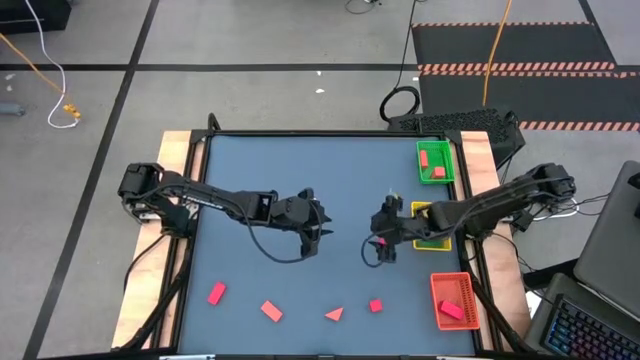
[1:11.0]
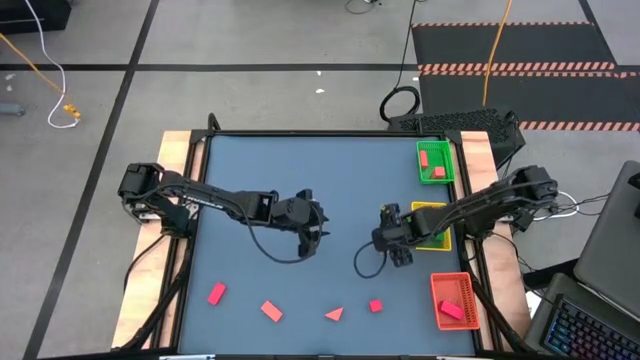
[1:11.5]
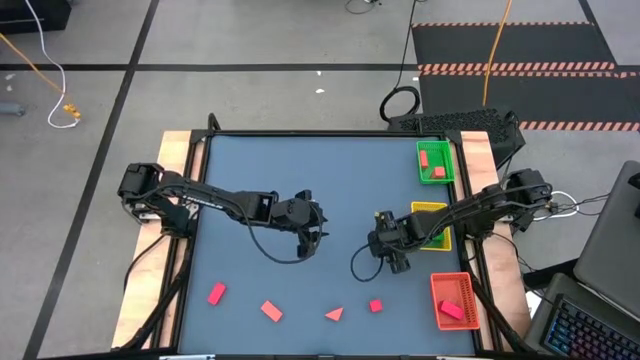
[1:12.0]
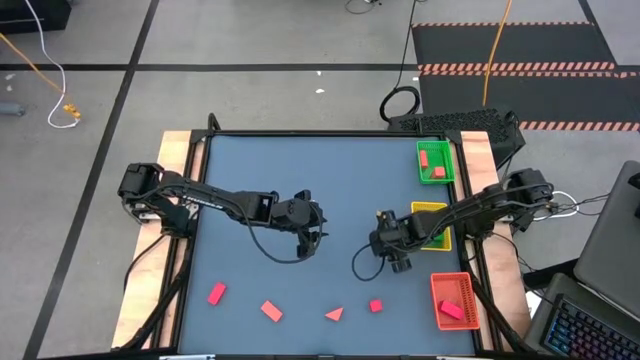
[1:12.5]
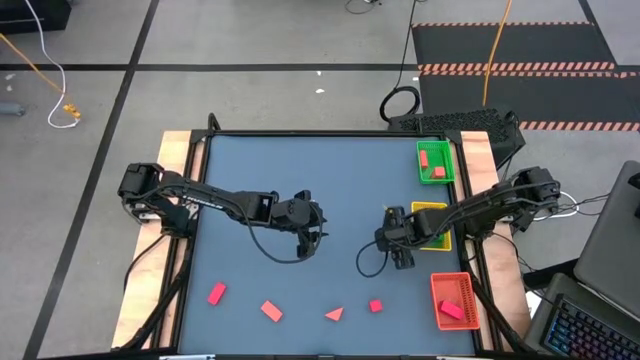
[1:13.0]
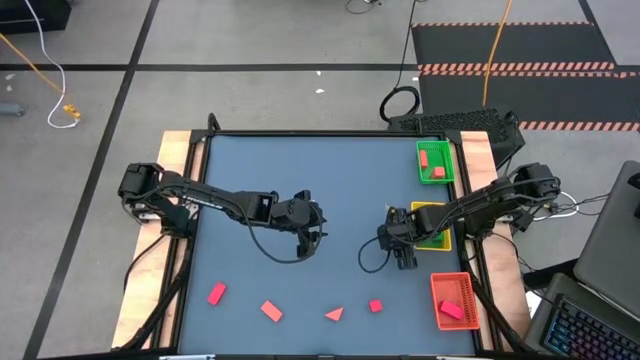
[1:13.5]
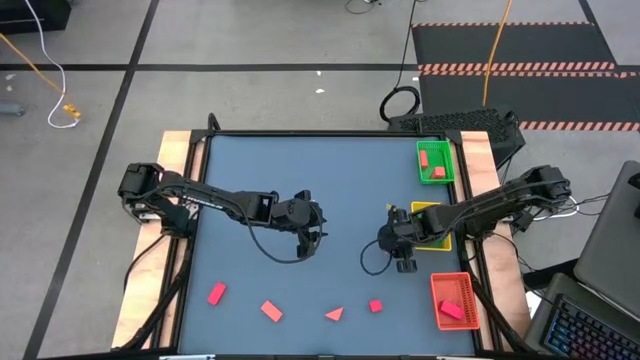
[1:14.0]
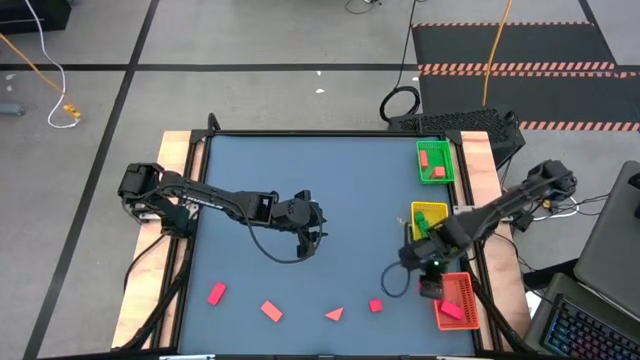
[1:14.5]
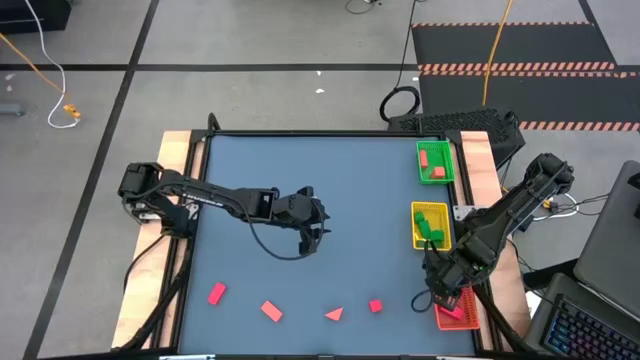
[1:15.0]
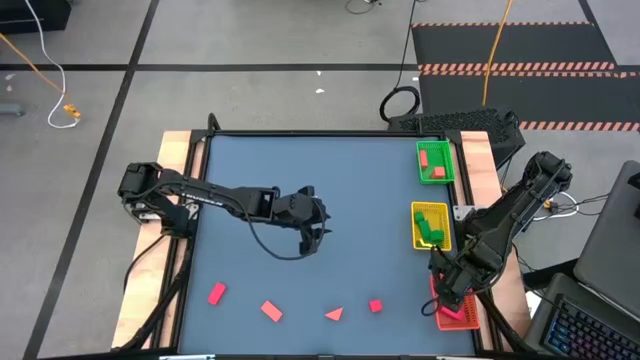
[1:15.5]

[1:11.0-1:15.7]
Task: Sort & place blocks by color
Put the top left red block into the orange basket

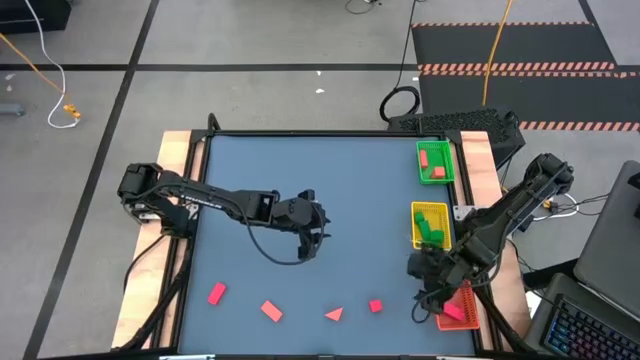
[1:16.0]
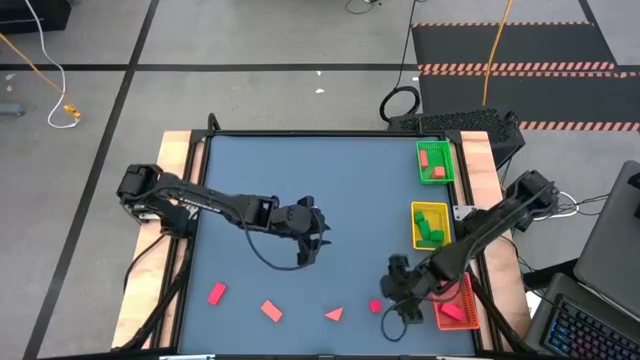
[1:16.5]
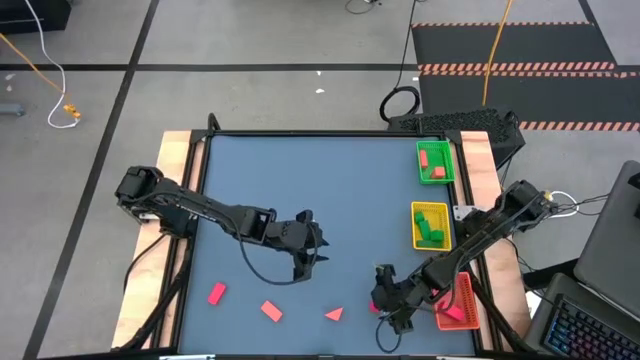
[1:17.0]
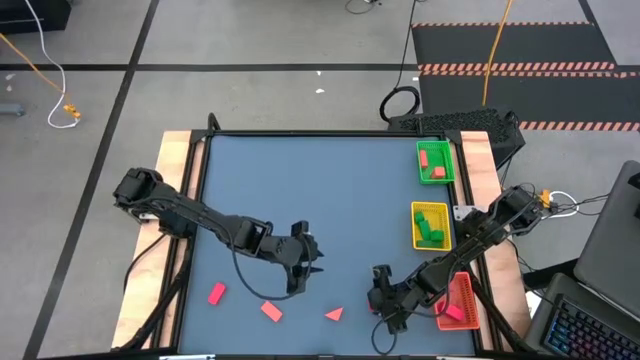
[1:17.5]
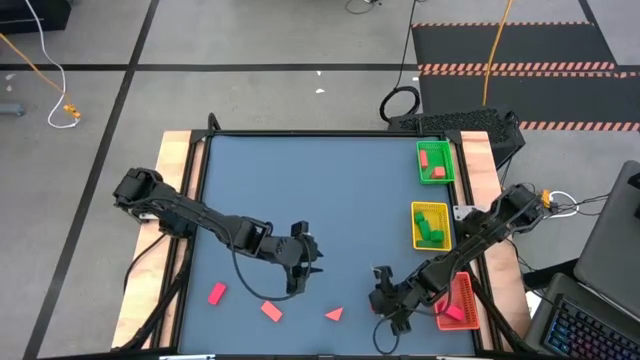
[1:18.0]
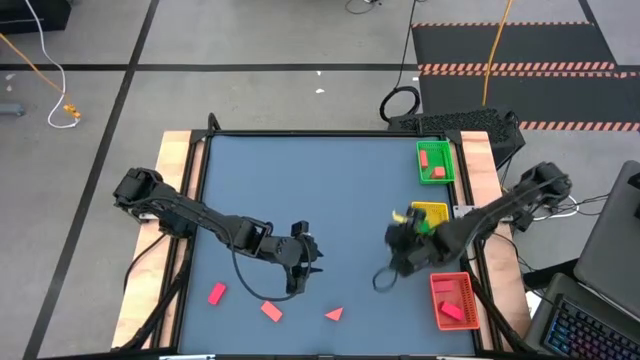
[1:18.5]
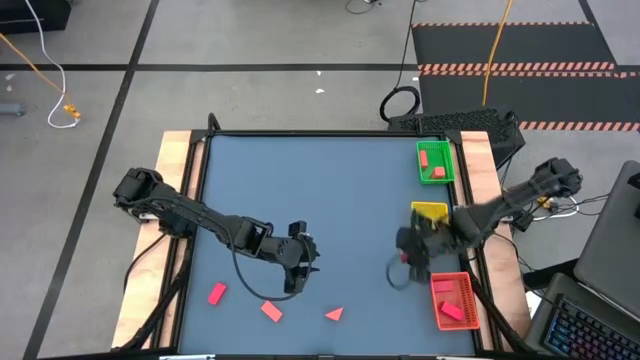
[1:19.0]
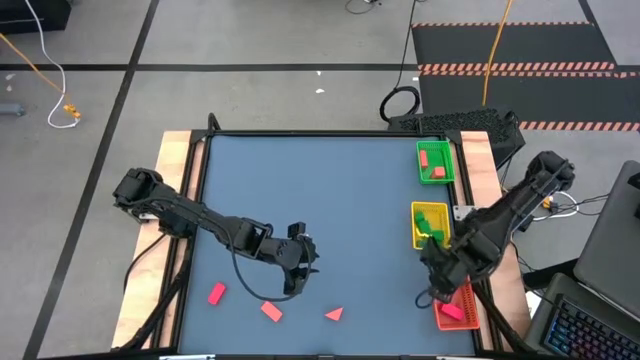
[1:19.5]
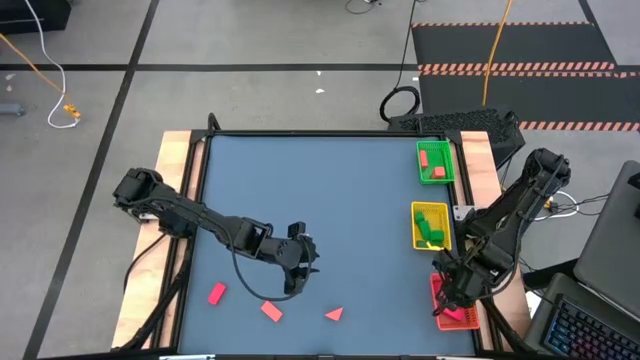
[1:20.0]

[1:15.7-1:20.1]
Put the right red block into the orange basket

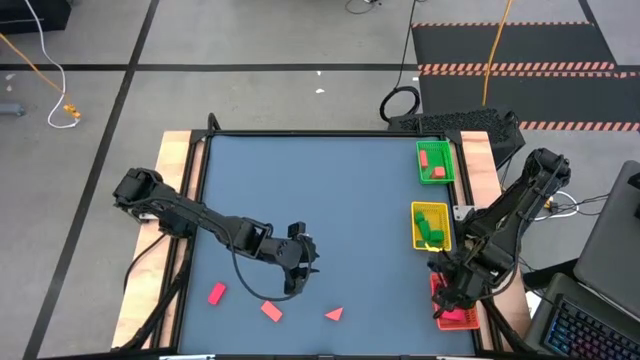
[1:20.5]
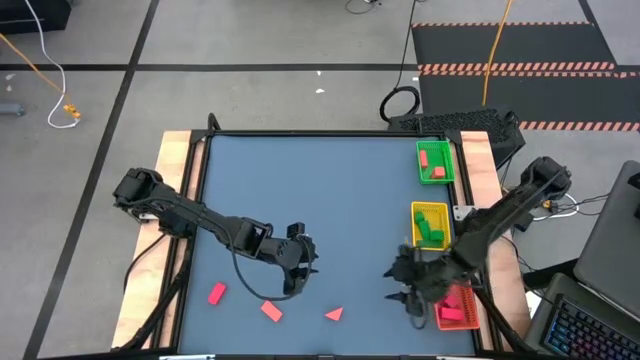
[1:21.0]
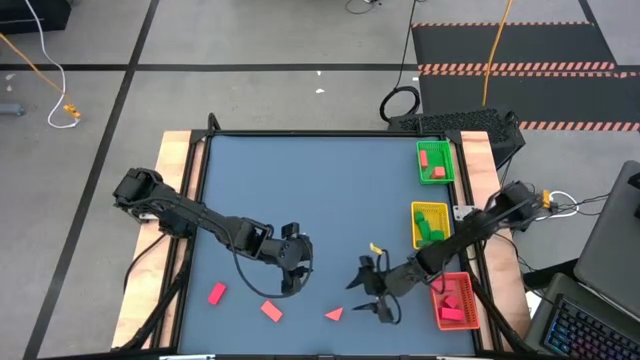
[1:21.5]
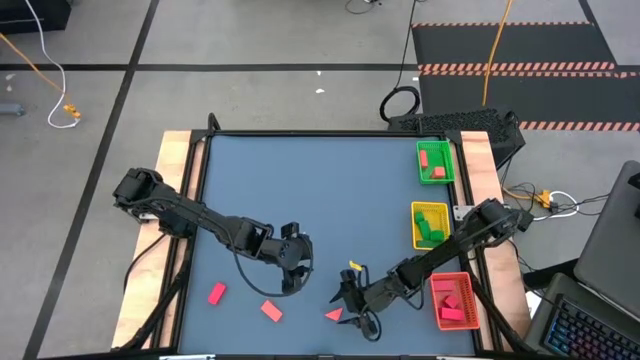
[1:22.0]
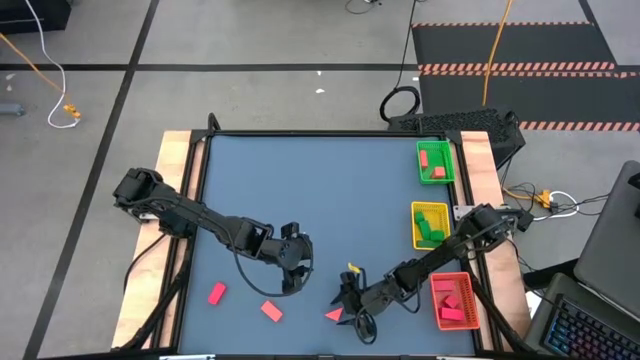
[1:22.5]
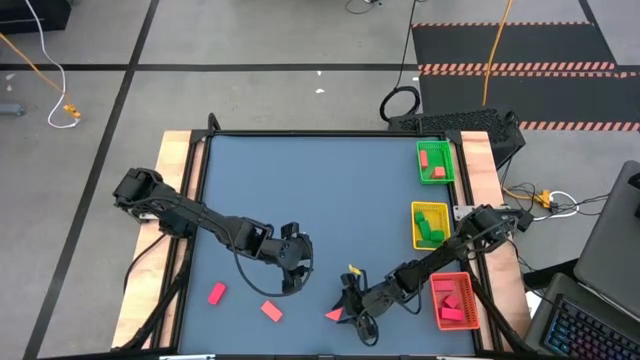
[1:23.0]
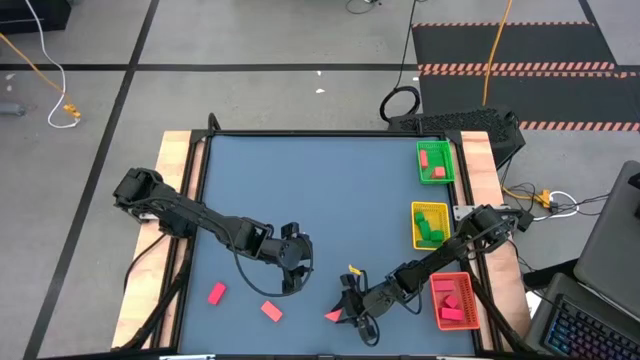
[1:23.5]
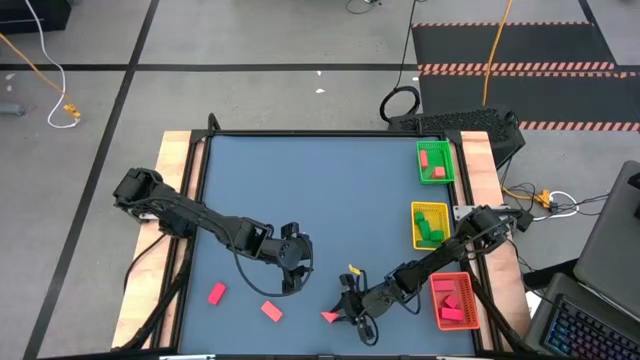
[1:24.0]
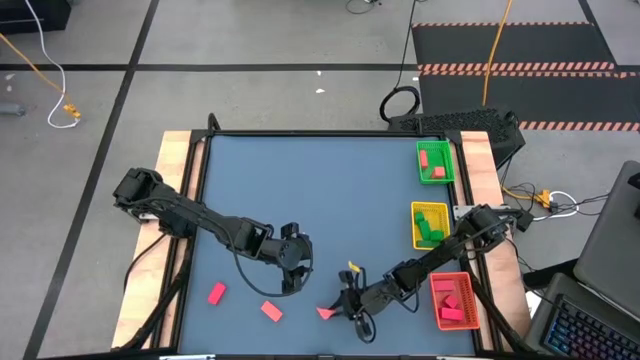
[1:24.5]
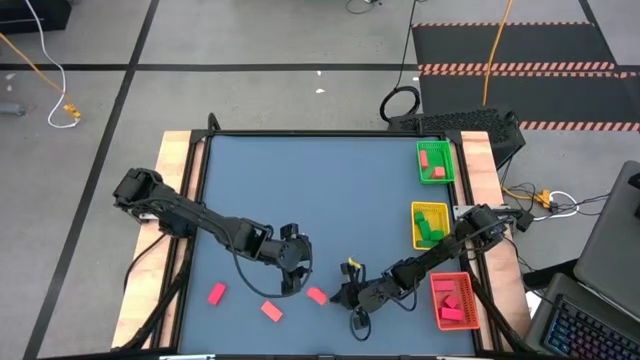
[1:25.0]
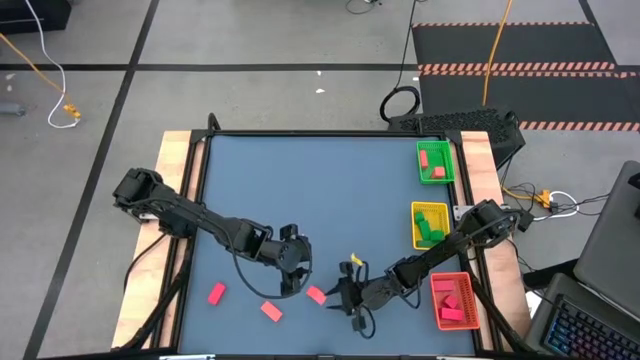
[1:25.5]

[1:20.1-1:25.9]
Put right orange block into the green basket

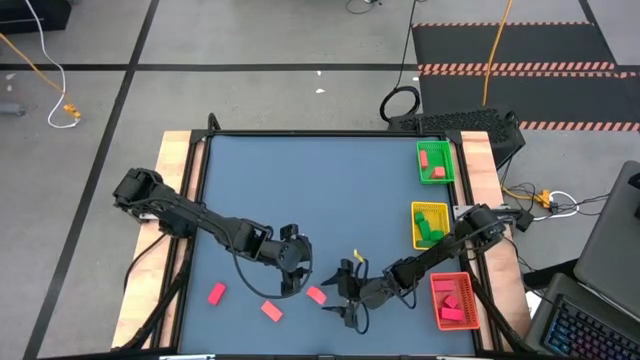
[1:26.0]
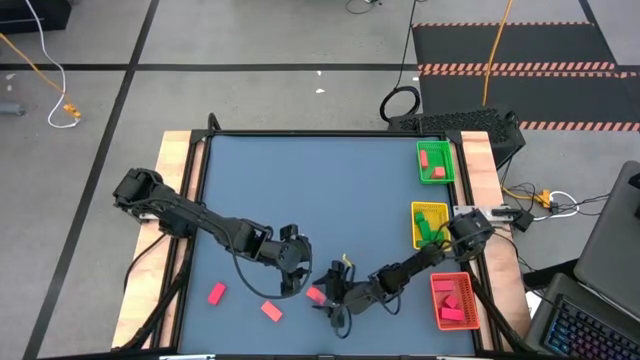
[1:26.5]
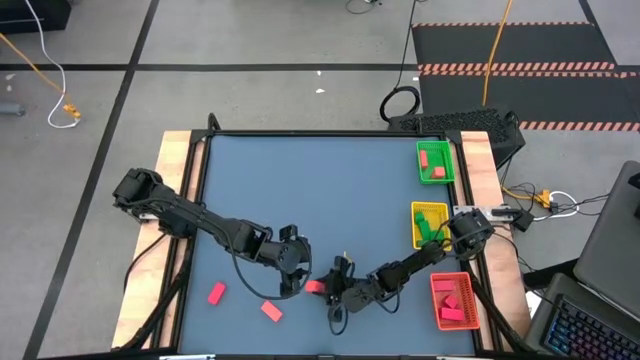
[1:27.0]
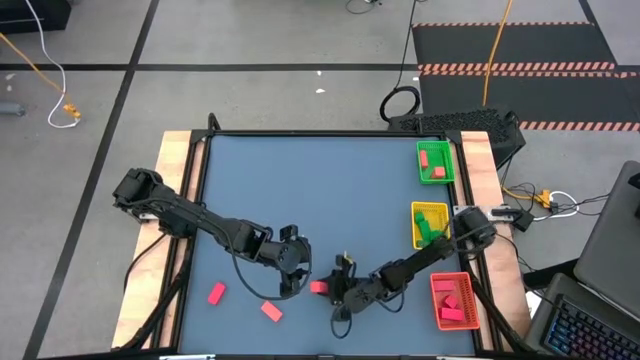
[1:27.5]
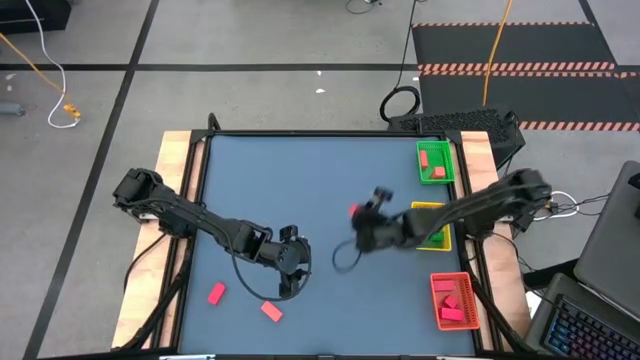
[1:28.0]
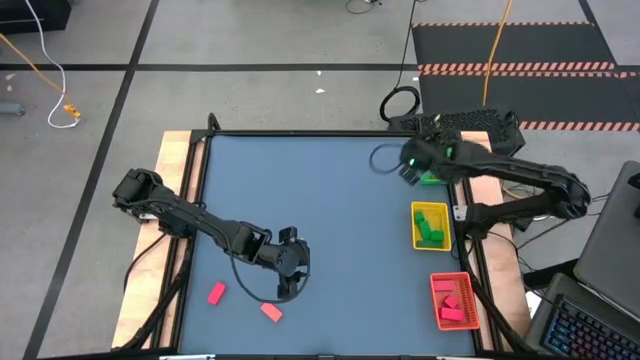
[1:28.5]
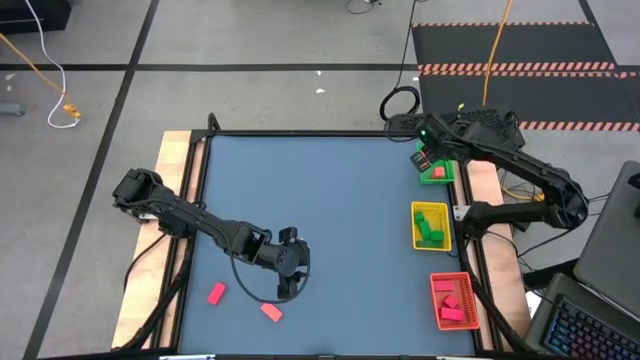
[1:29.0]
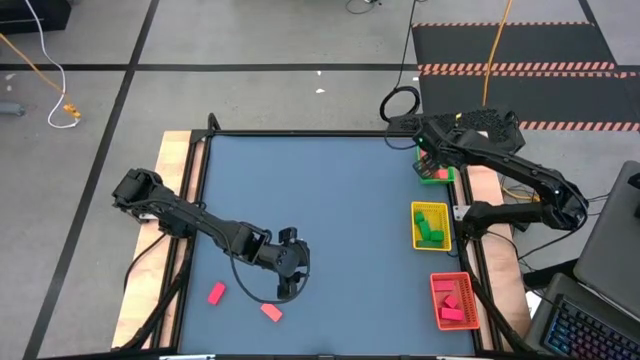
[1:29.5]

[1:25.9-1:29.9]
Put right orange block into the green basket
